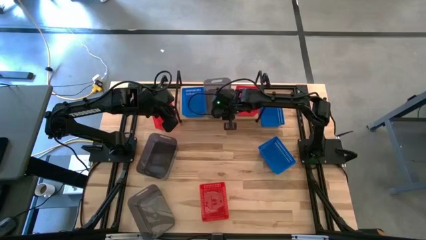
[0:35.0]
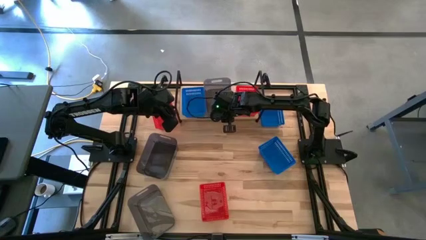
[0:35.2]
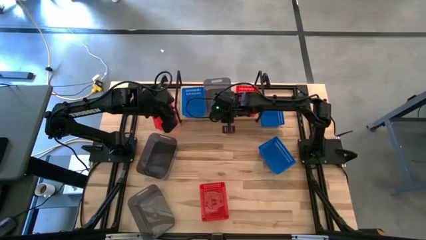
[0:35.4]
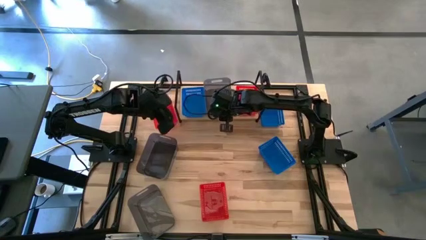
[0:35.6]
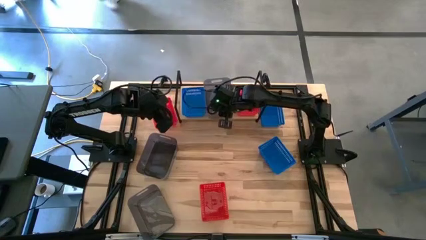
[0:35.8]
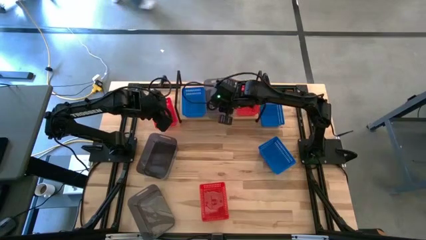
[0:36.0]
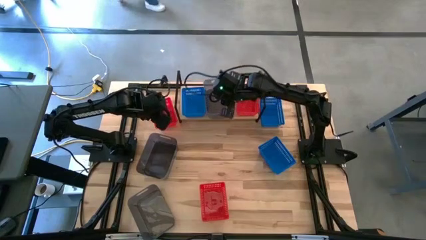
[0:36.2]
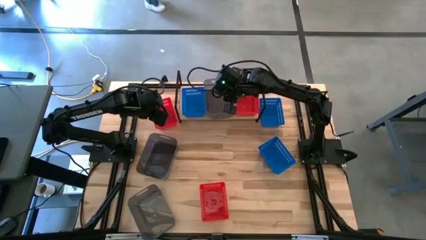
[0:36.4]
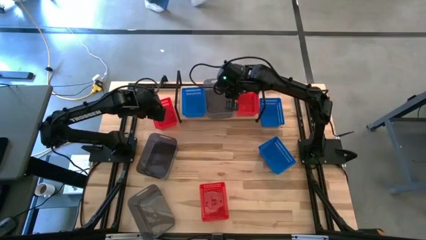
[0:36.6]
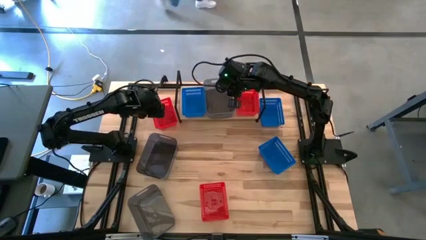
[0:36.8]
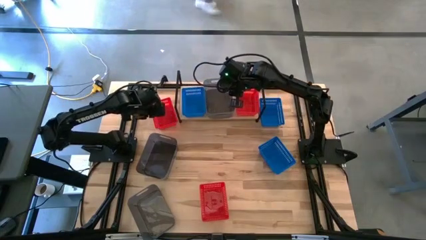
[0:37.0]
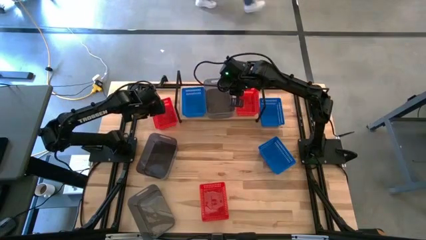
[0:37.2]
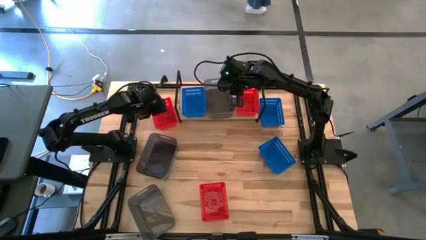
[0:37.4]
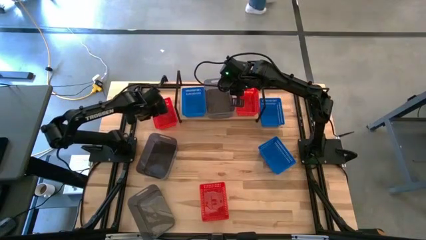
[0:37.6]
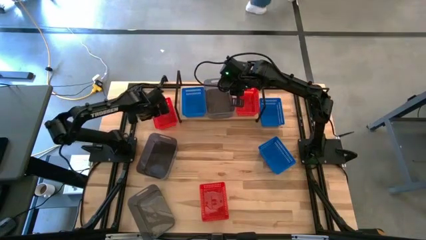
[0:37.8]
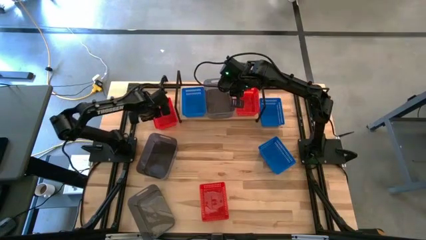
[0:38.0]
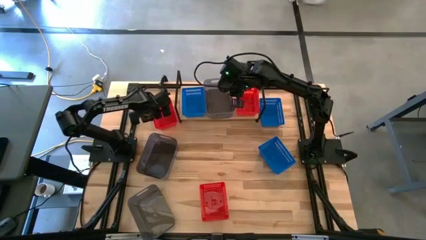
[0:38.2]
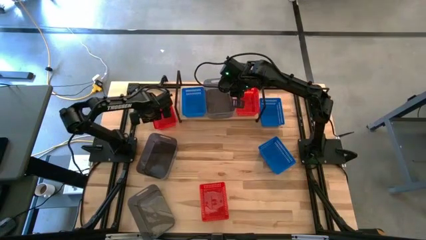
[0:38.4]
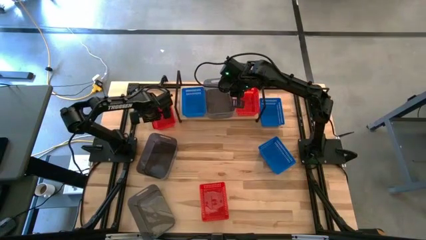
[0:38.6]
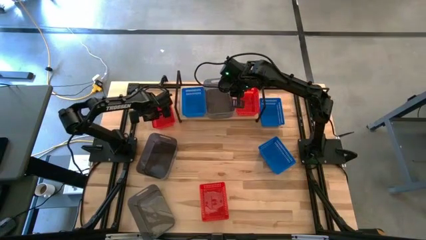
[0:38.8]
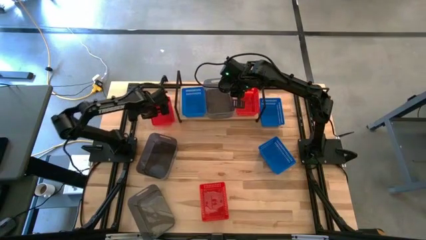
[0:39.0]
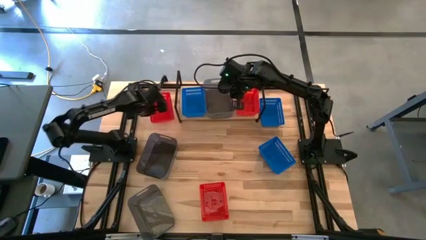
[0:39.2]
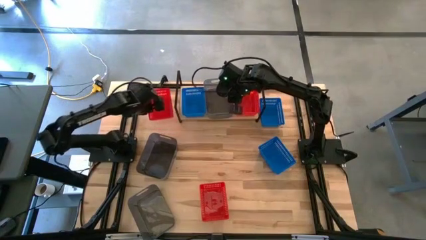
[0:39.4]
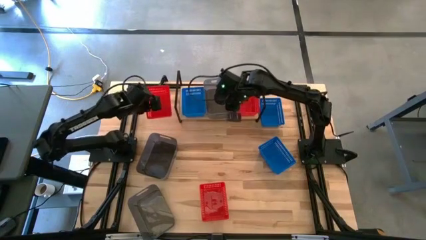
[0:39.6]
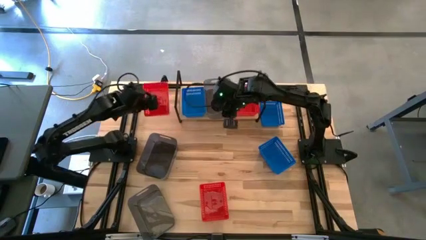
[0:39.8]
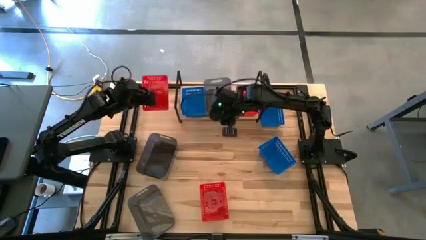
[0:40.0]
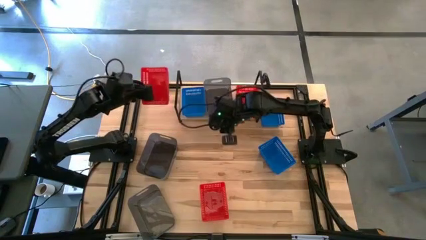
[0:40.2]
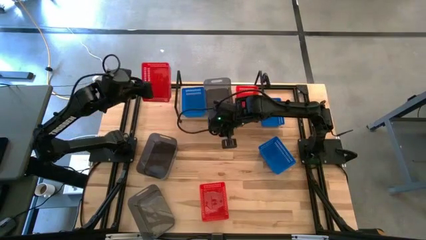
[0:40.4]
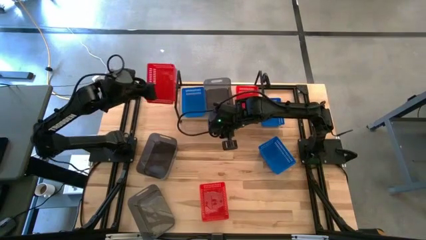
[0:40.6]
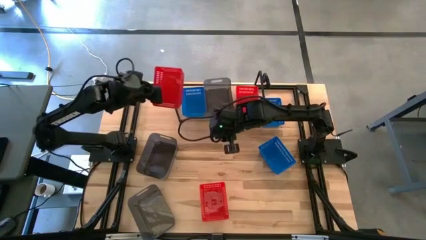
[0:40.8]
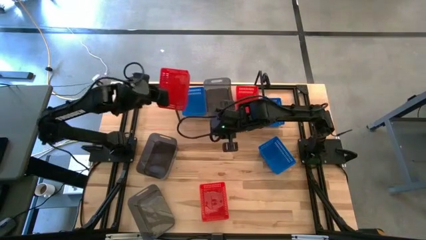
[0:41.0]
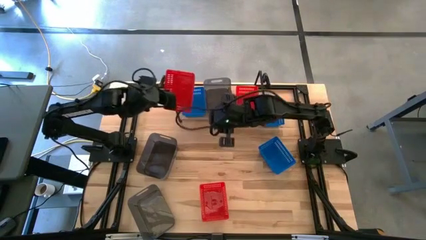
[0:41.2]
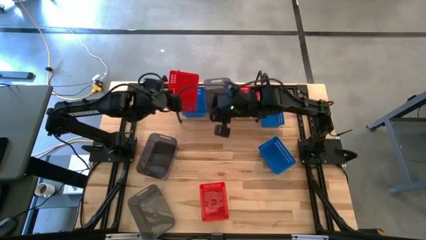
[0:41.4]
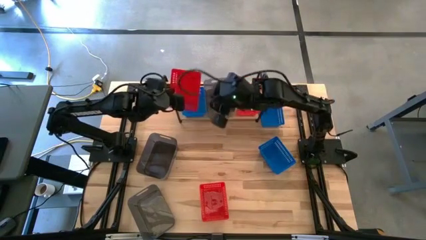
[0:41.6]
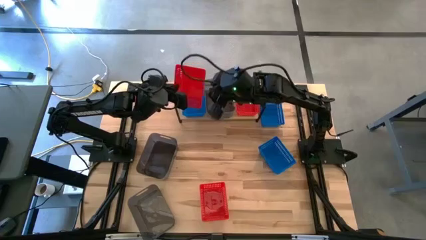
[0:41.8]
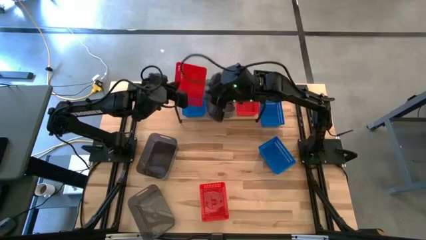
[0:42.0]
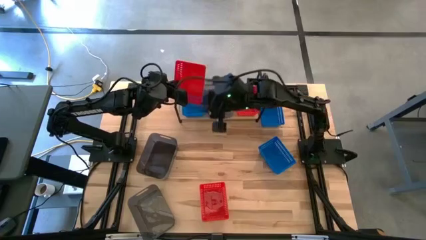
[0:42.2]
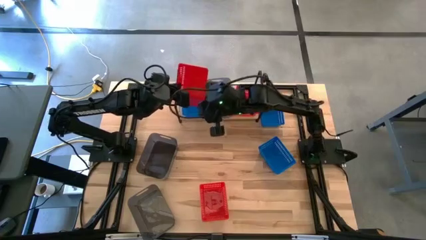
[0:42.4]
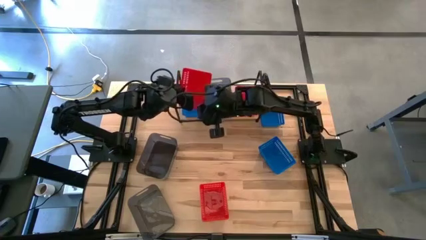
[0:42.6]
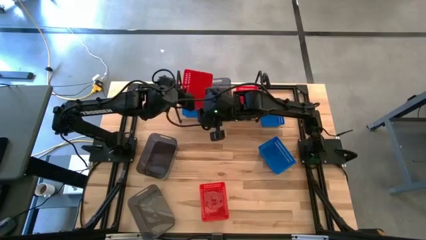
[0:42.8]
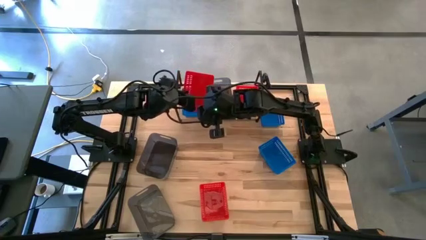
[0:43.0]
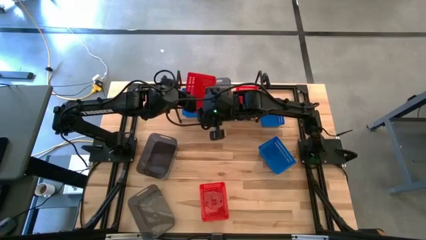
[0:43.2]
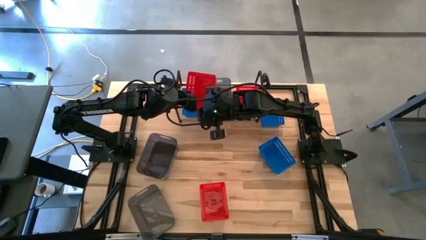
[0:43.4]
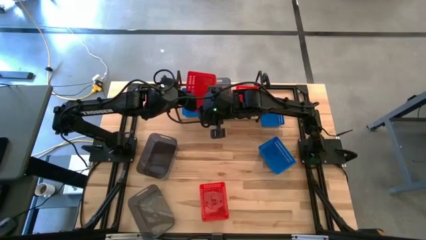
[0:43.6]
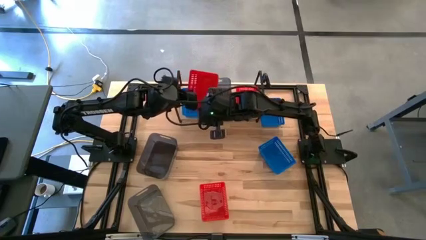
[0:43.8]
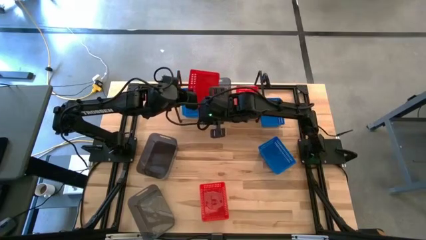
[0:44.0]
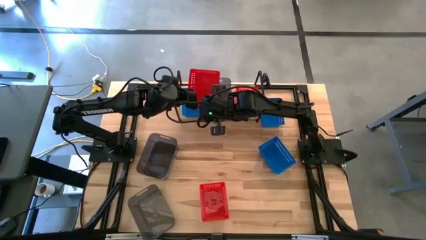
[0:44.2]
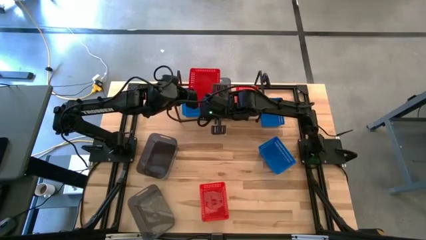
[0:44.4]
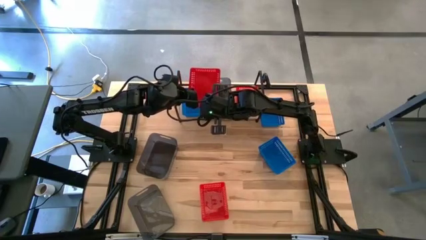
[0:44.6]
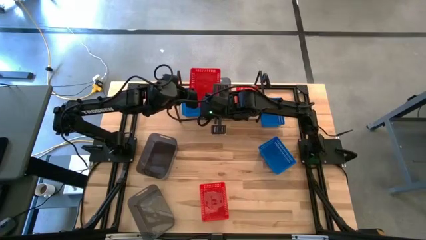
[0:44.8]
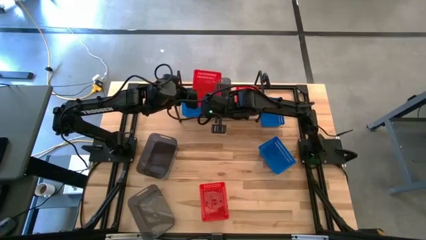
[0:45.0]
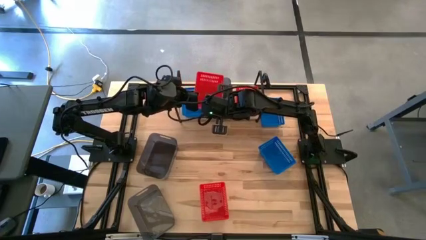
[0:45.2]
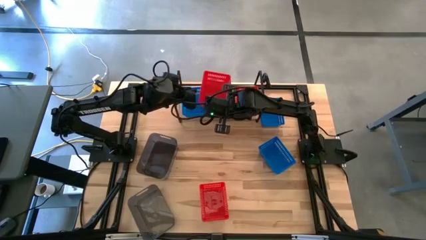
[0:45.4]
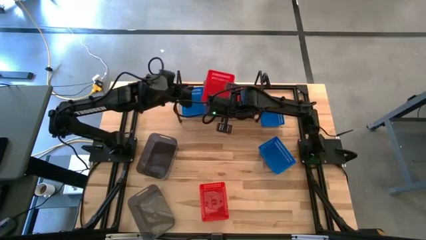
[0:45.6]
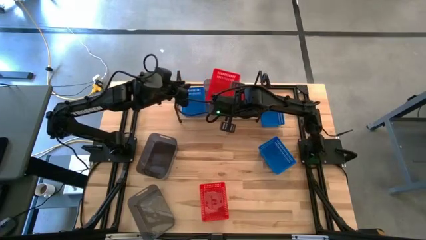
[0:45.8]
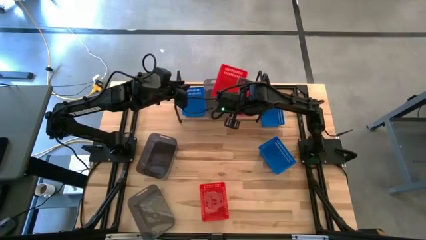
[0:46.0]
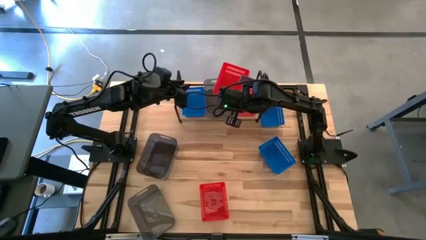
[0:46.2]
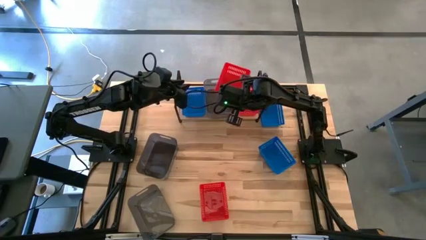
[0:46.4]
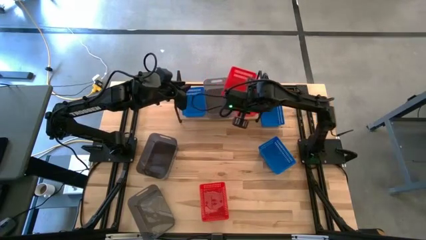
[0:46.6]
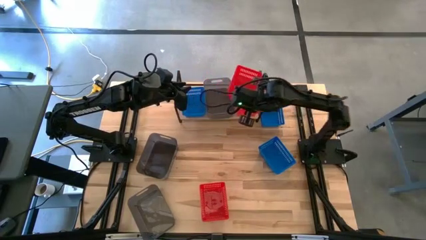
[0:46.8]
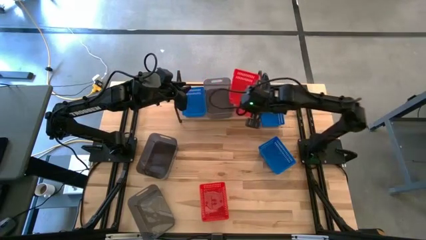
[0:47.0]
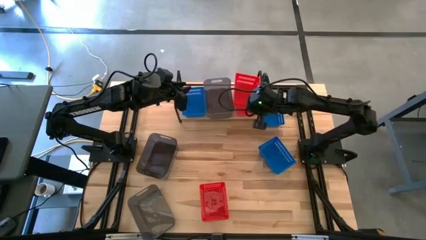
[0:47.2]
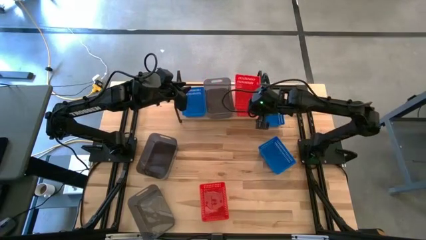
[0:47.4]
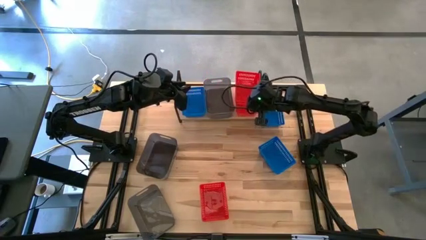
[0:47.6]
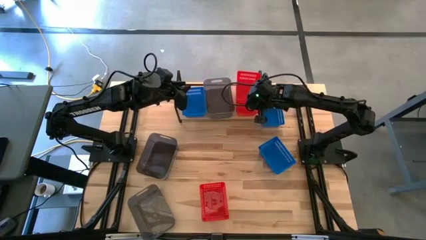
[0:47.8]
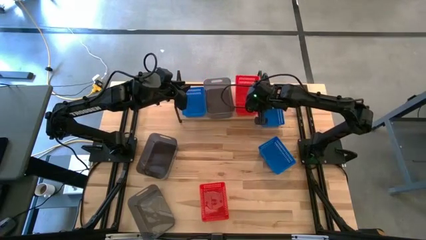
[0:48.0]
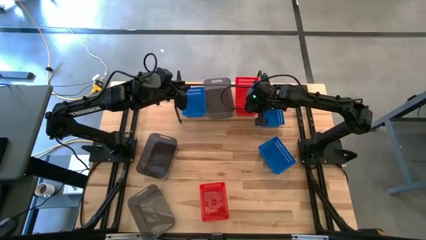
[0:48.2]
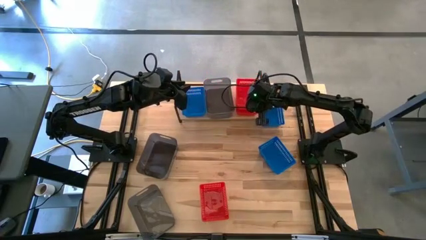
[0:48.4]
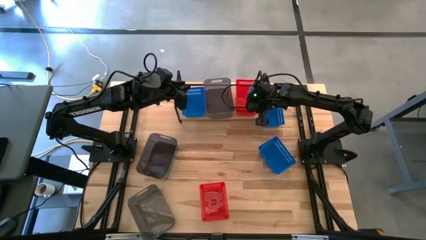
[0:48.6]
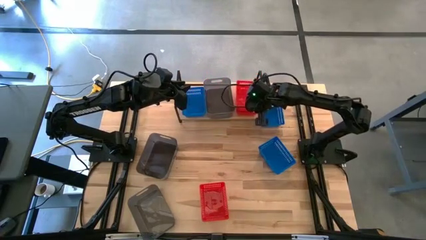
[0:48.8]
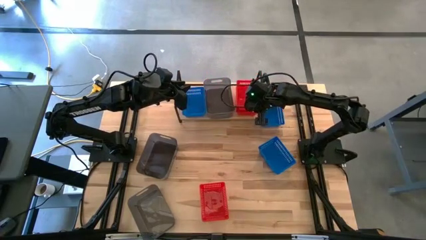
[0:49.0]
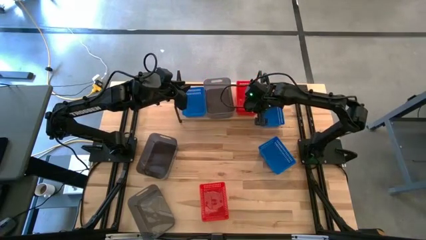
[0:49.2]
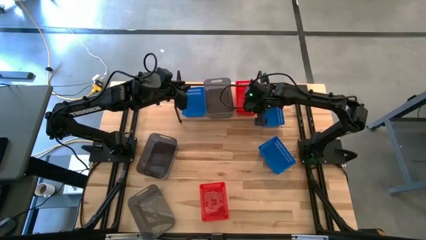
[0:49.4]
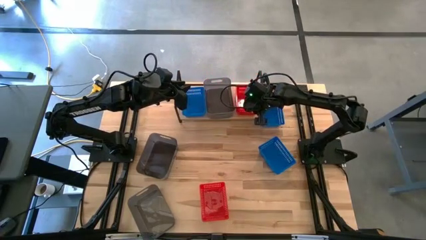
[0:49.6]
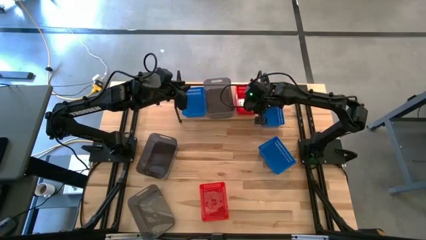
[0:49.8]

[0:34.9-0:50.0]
Task: Stack baskets on shelf by color
Stack the top red bin on the red bin on the shelf
